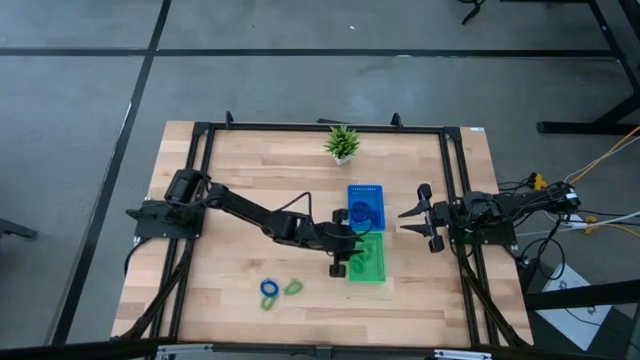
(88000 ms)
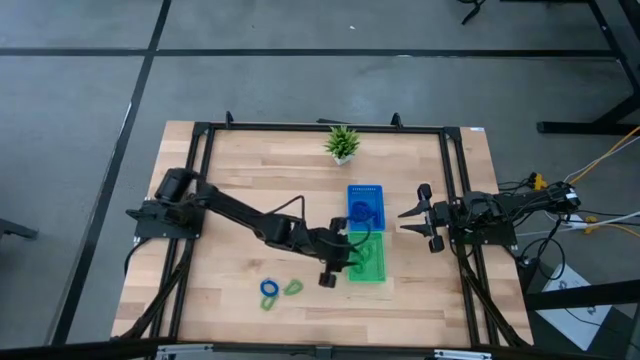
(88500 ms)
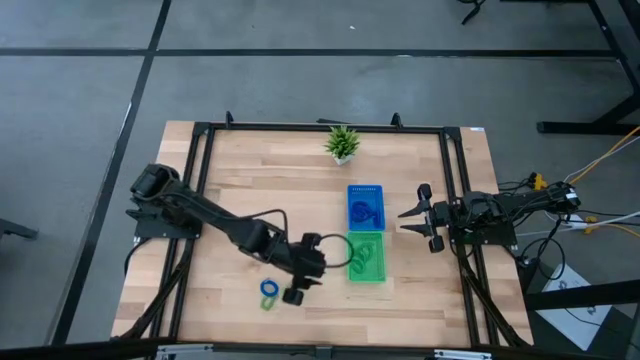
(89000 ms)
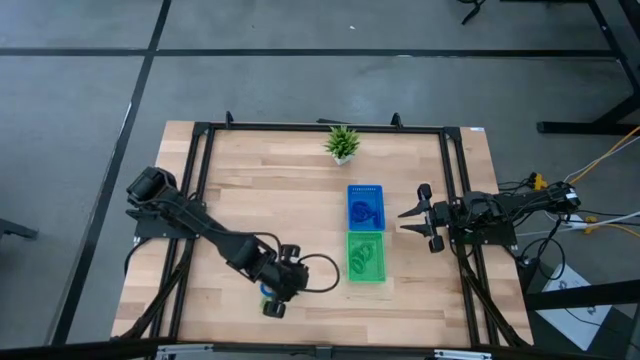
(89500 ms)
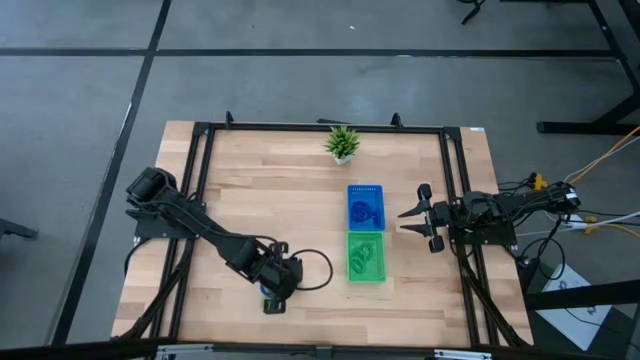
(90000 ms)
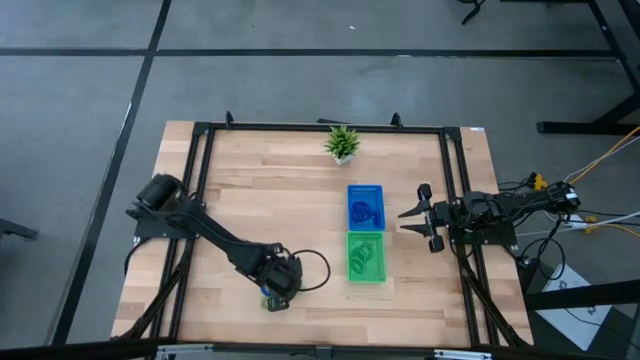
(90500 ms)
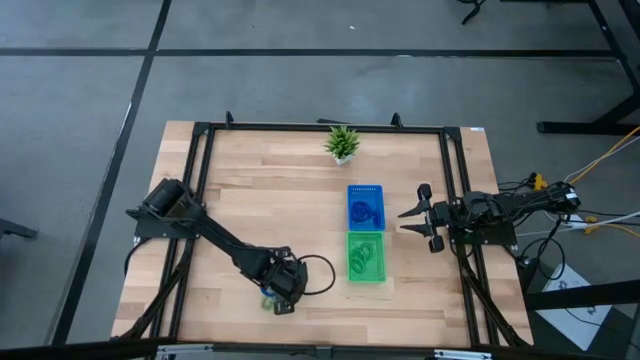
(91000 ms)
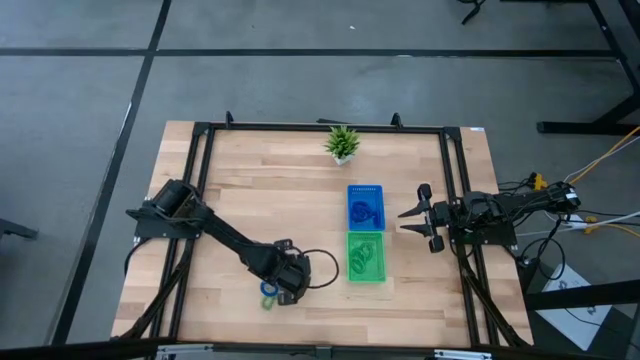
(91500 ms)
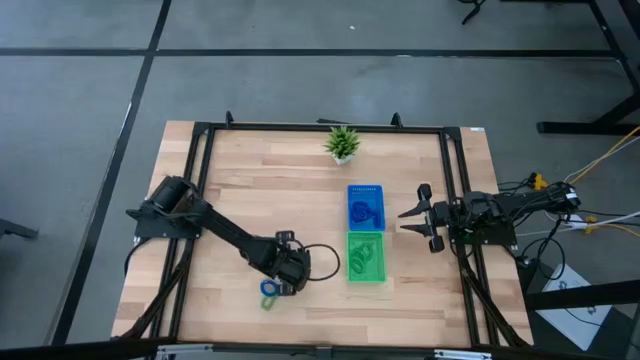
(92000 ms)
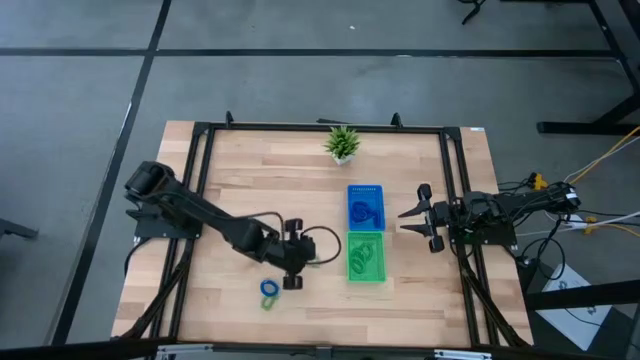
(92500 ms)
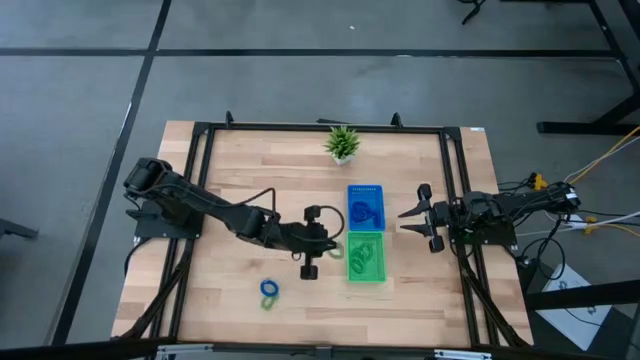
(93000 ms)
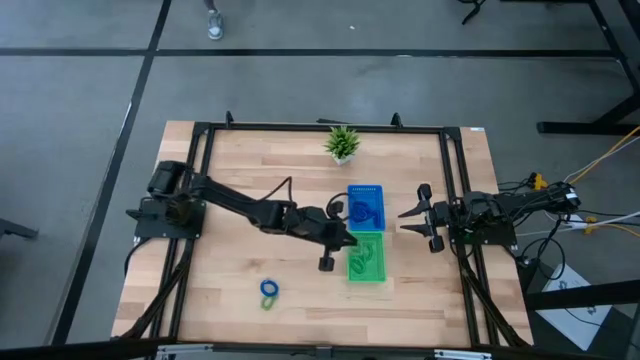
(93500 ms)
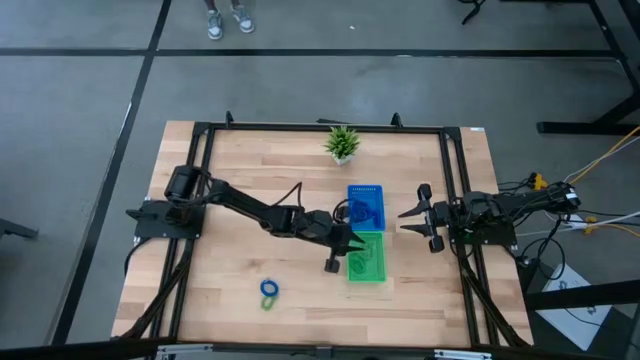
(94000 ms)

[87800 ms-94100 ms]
Task: Sort spring keychains
Put the green spring keychain into the green bin

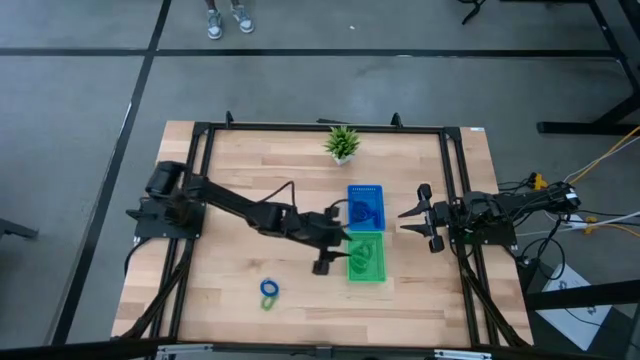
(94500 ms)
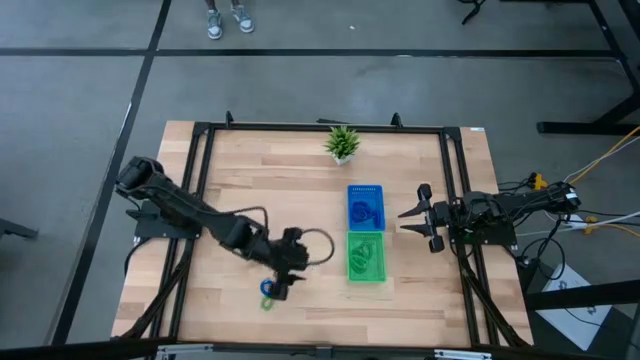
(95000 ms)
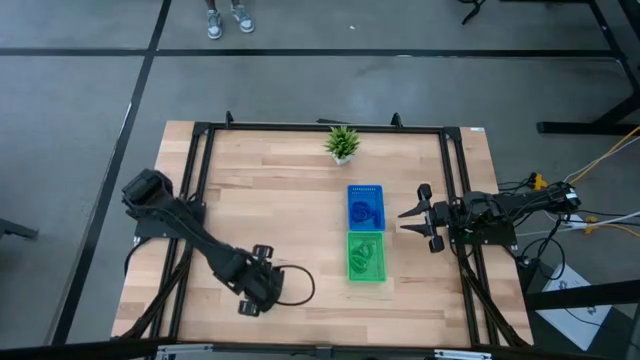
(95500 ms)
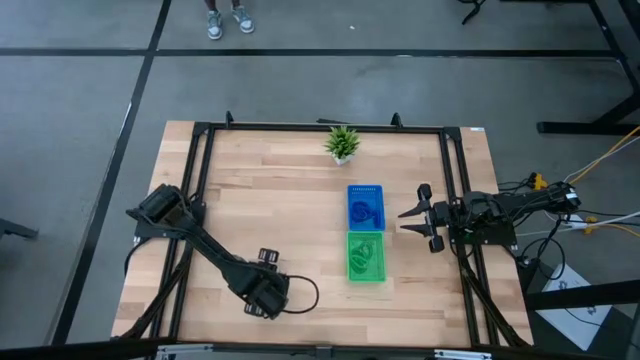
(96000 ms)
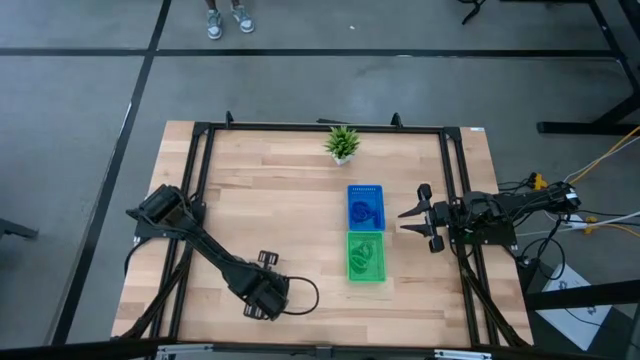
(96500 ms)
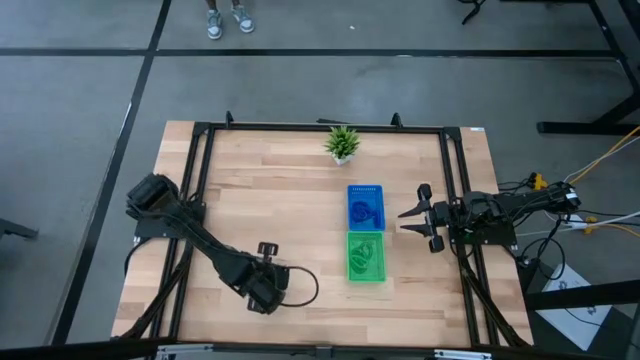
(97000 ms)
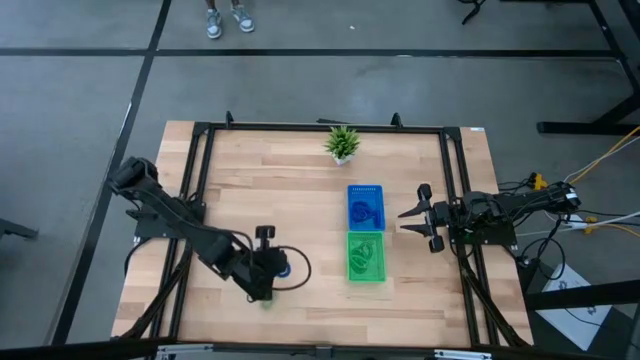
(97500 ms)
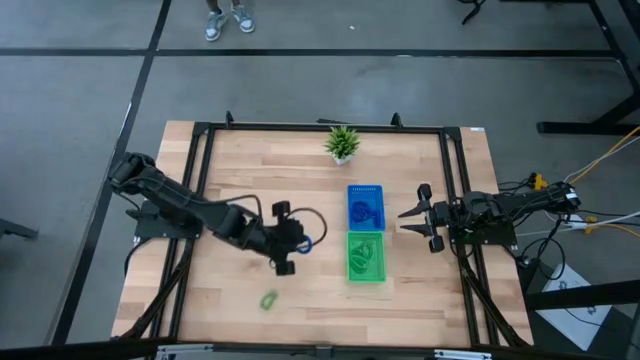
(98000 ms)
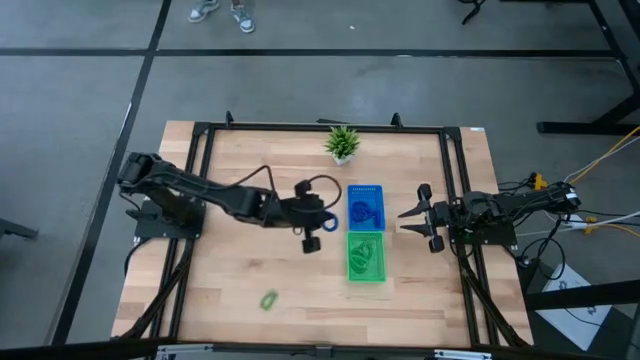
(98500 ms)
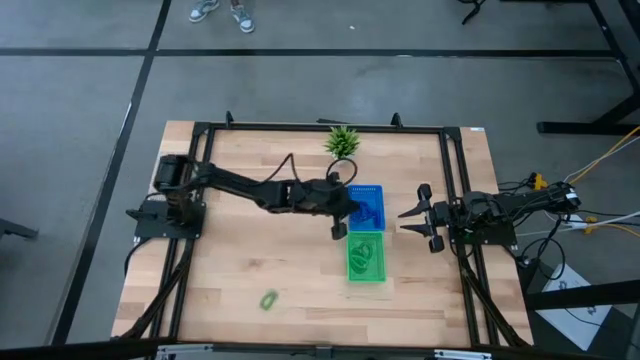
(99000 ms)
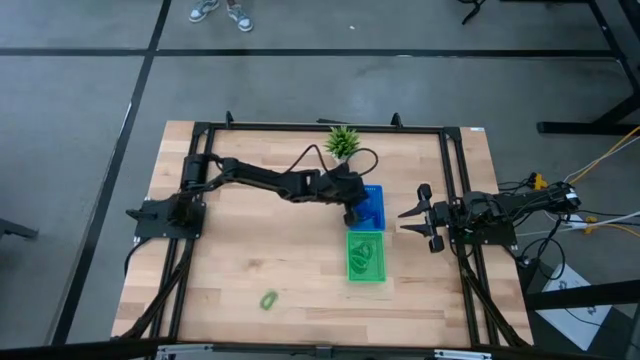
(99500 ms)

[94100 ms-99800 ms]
Put the blue spring keychain into the blue bin

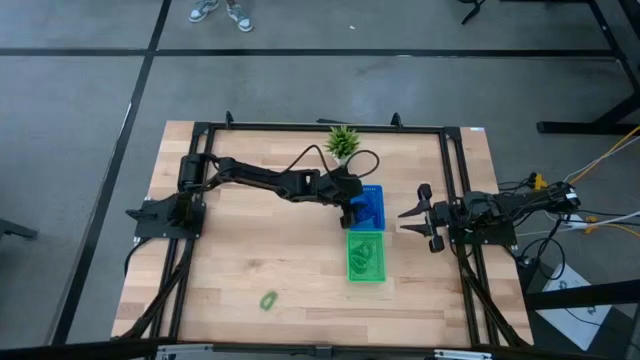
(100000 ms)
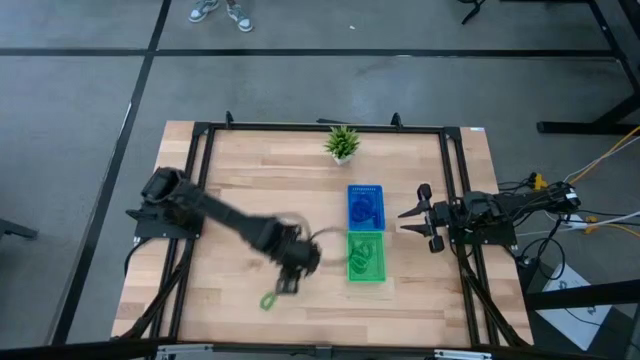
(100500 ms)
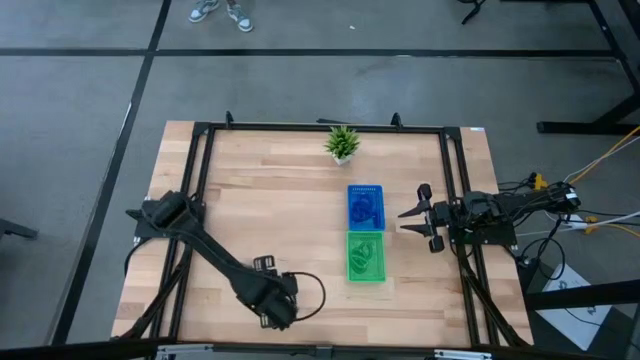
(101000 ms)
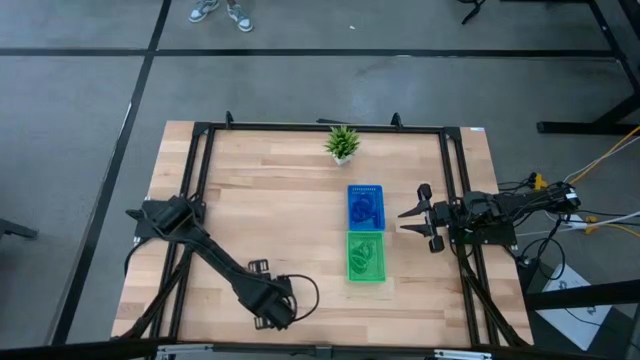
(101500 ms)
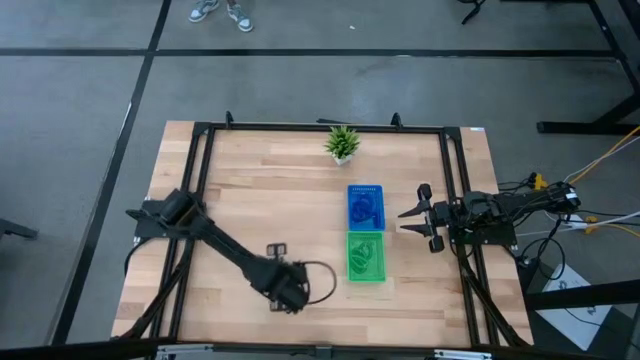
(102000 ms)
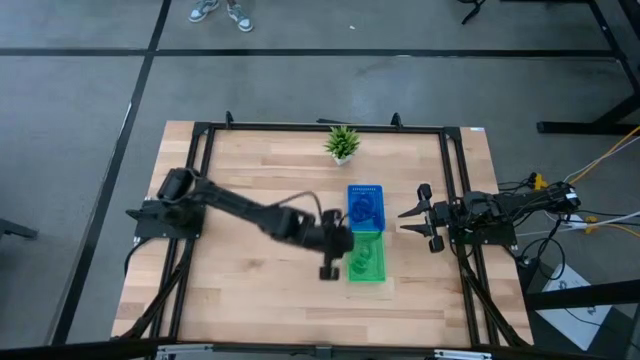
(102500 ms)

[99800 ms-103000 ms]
Put the green spring keychain into the green bin

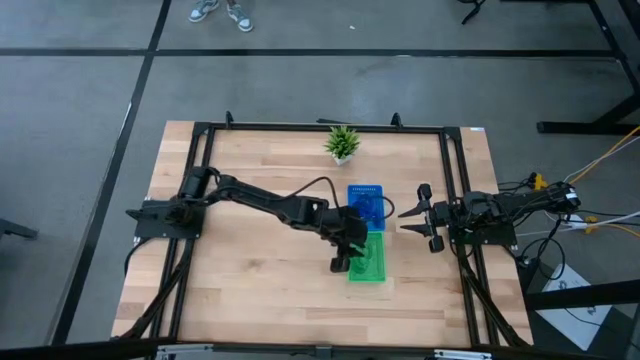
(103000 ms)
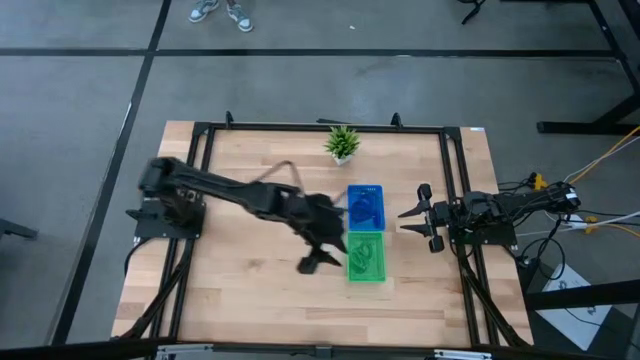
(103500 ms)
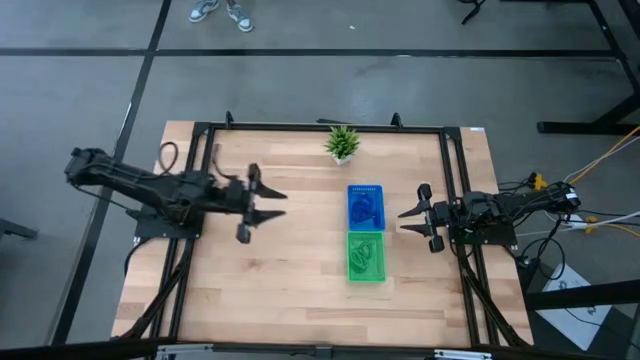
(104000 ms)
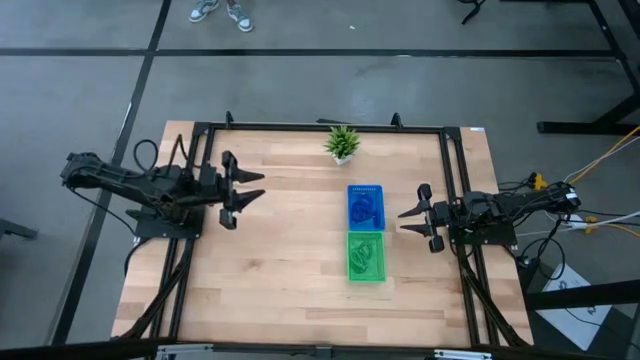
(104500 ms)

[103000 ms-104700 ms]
Return to Home Position

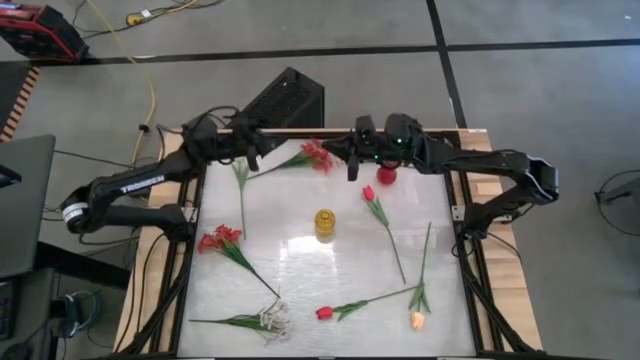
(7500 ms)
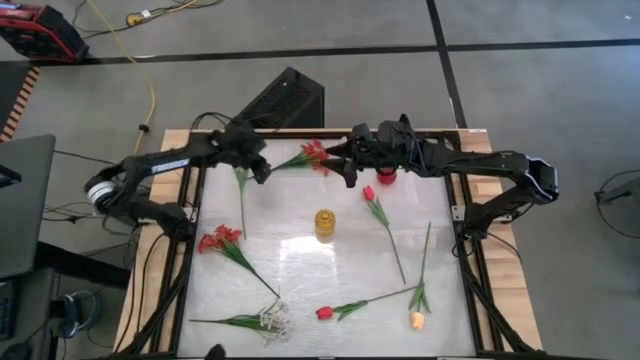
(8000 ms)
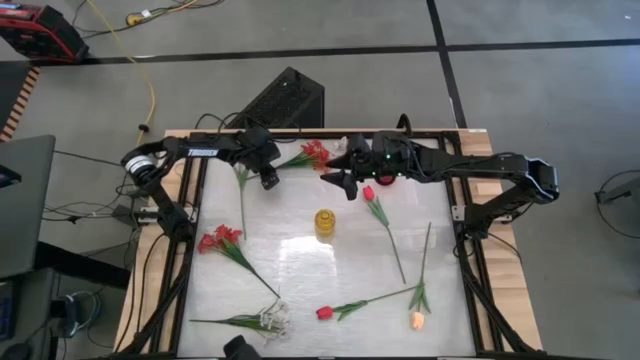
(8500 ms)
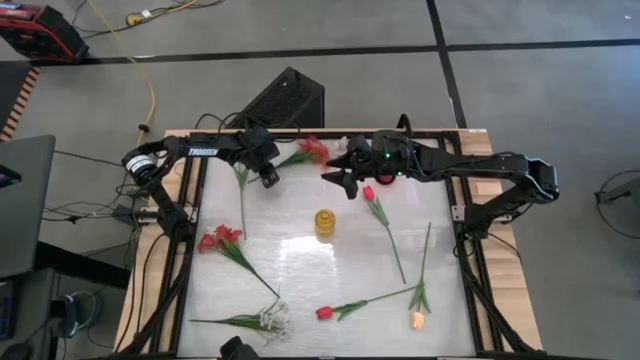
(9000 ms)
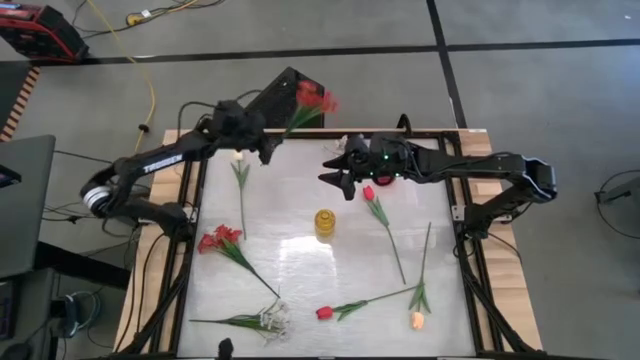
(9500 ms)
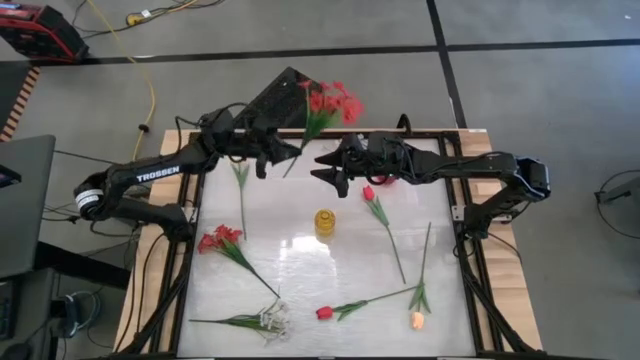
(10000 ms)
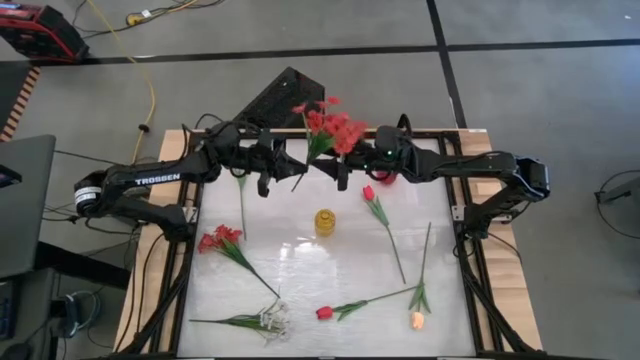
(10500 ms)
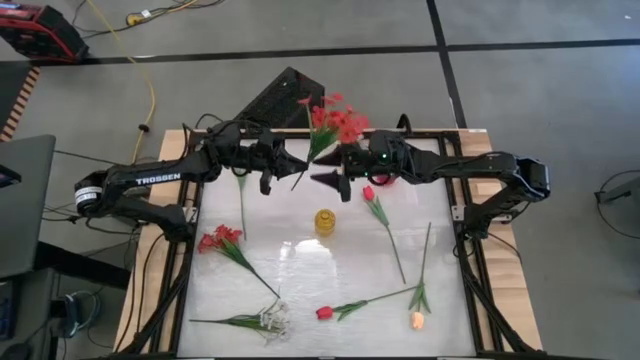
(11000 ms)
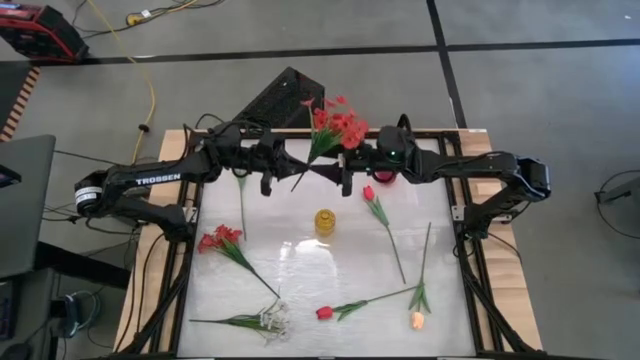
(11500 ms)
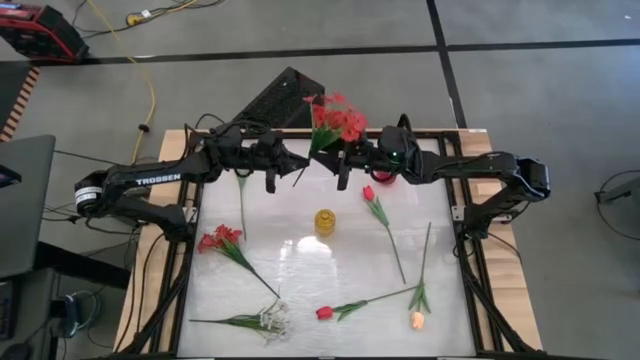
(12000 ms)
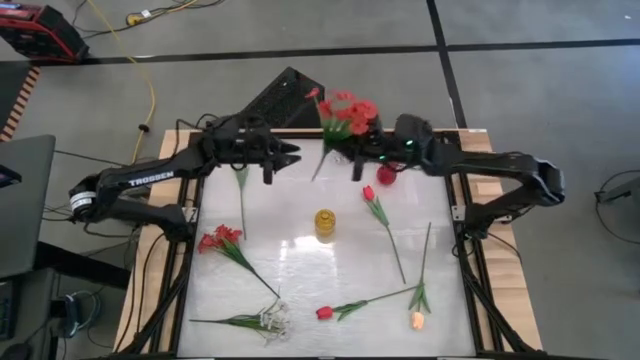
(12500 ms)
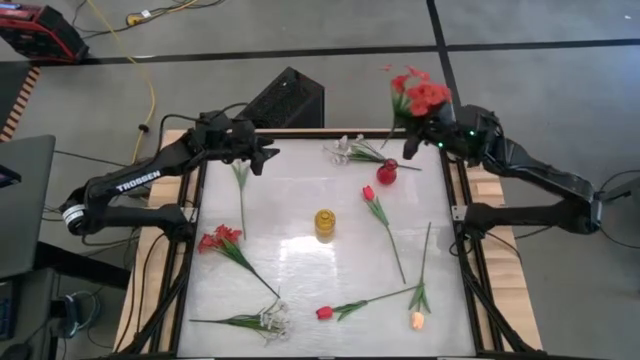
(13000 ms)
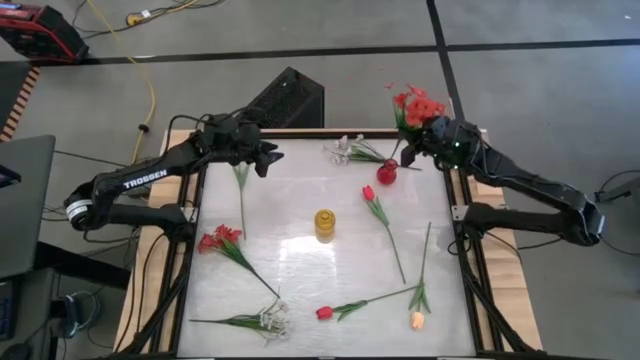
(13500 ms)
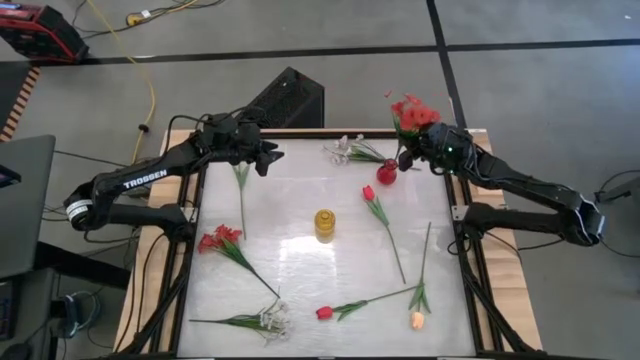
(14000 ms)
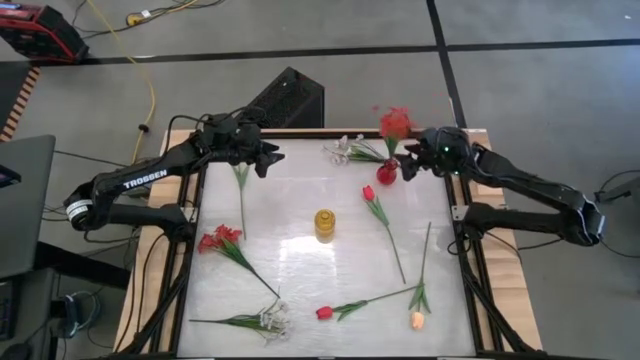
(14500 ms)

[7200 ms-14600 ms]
Task: Sort flowers into vase by color
Put the top red flowers into the red vase
